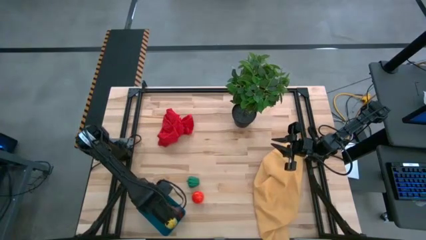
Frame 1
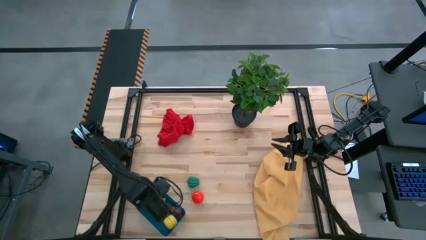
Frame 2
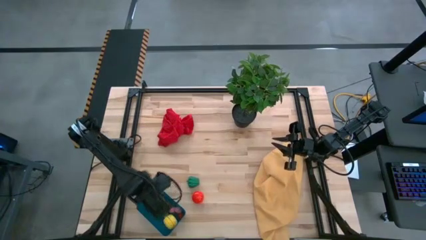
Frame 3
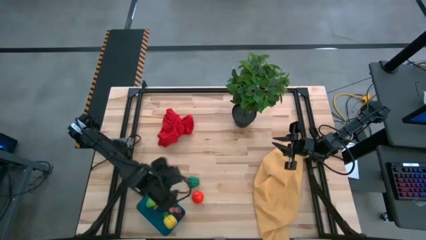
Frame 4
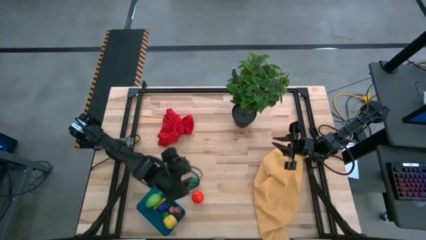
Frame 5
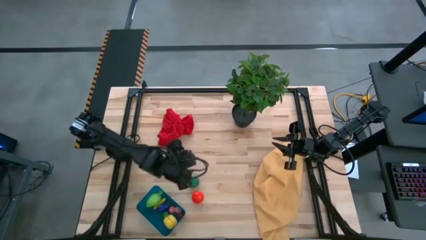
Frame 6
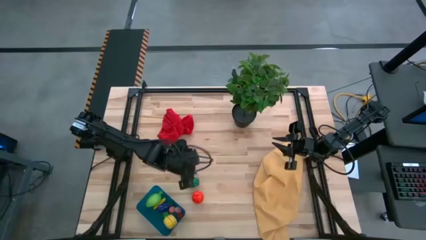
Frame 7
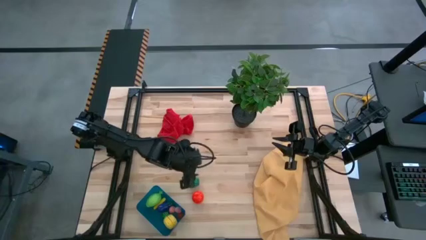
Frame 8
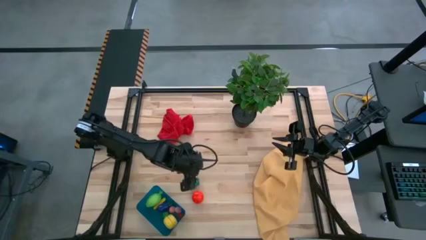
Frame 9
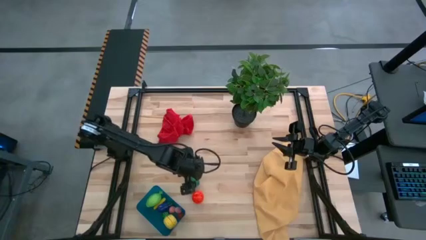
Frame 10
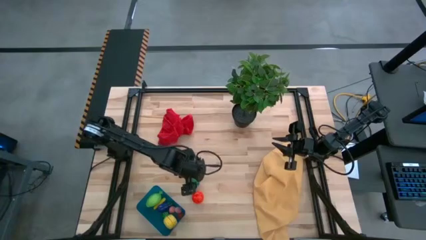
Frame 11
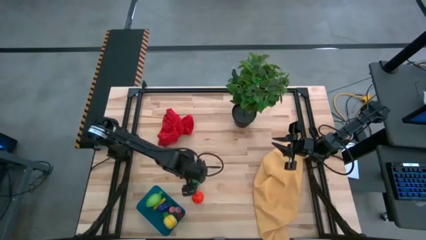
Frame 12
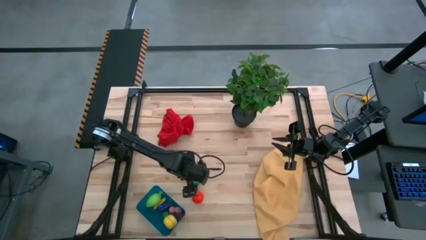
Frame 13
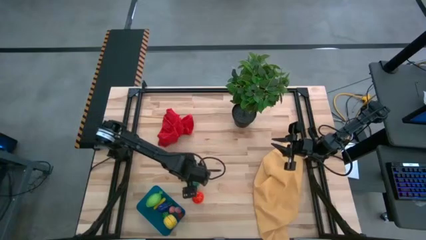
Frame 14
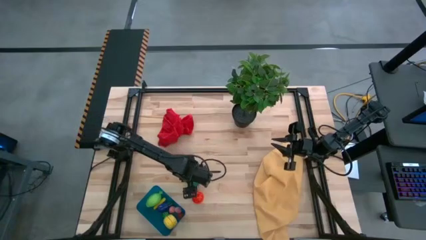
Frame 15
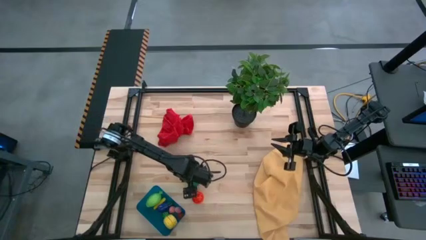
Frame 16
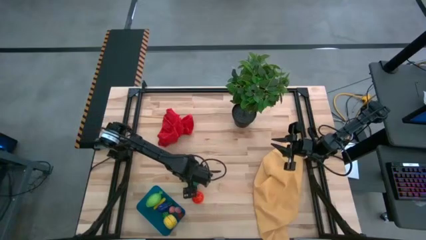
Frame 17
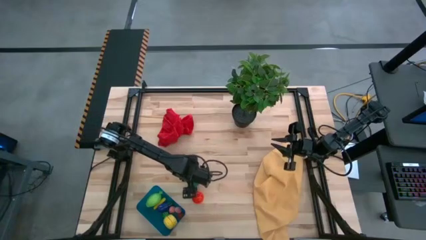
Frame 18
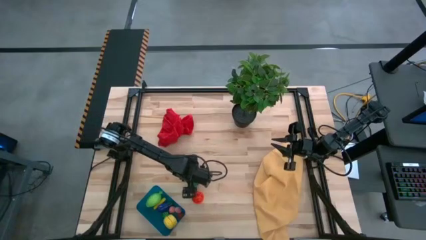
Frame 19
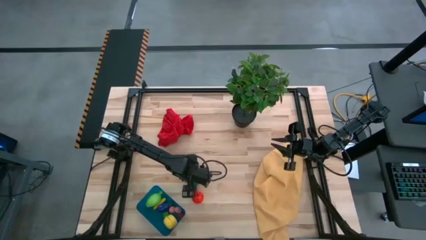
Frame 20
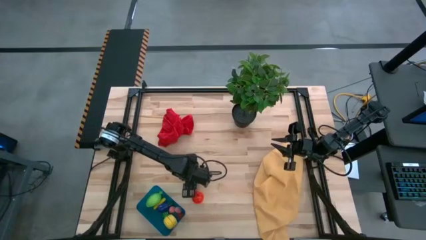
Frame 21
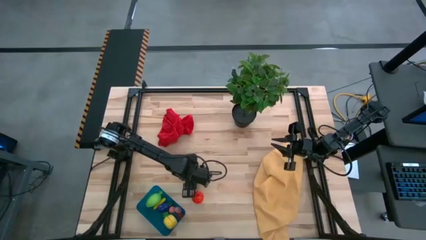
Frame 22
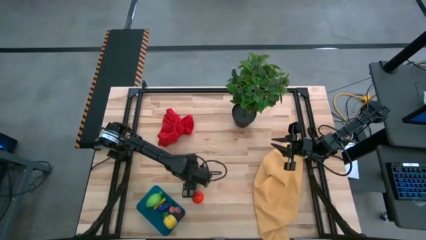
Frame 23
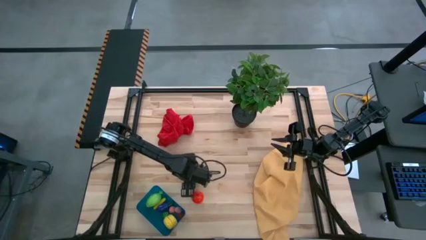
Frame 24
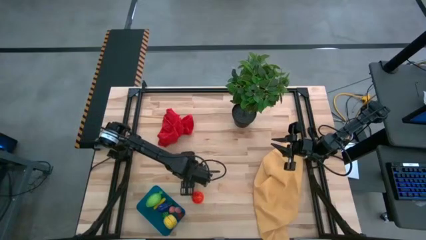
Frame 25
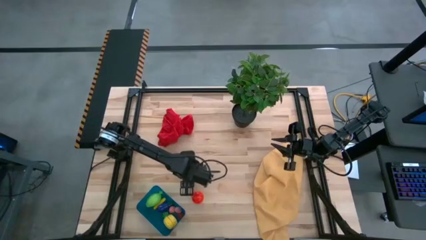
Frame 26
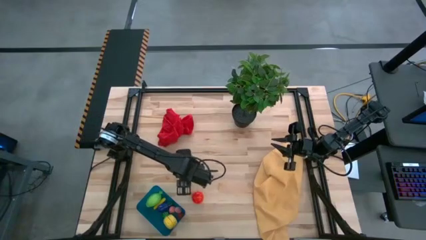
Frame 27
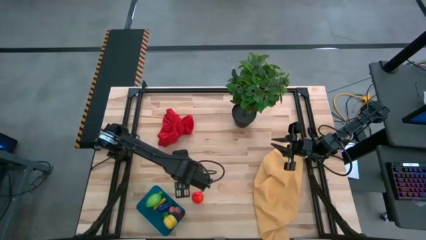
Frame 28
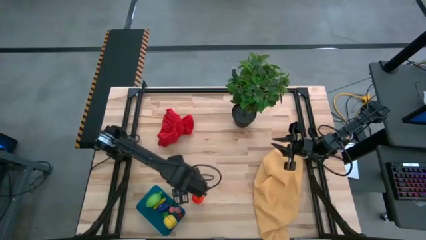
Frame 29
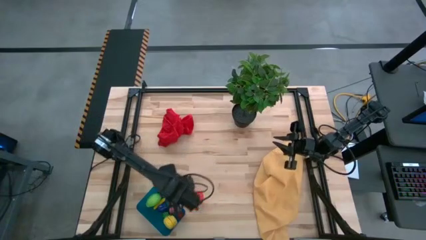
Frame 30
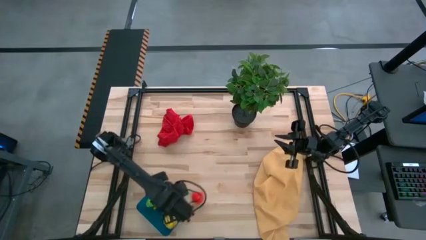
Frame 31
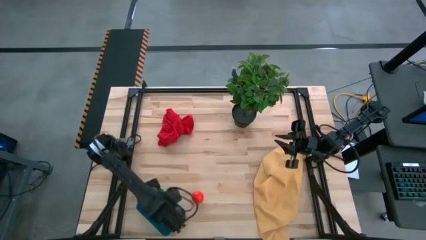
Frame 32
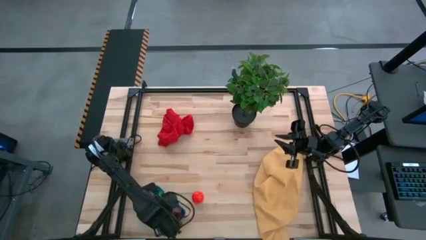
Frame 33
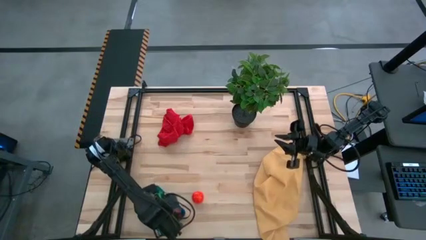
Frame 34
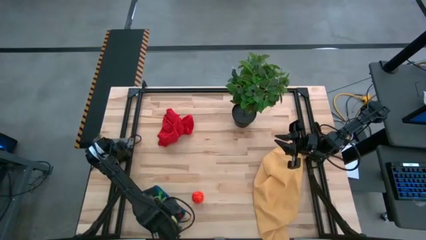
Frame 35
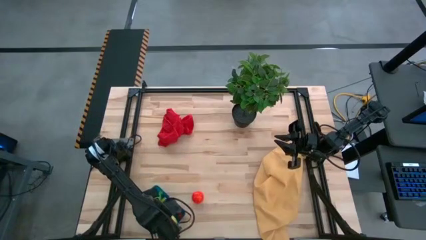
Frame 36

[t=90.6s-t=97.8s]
Task: Pick and placing Produce into tupperware
Put the green pepper into the blue bin

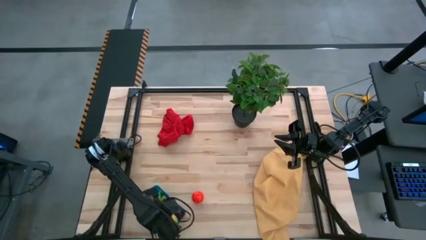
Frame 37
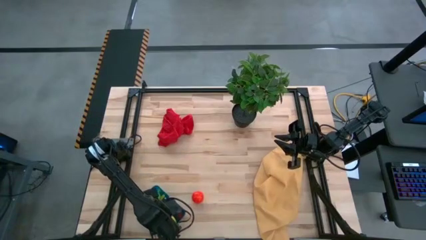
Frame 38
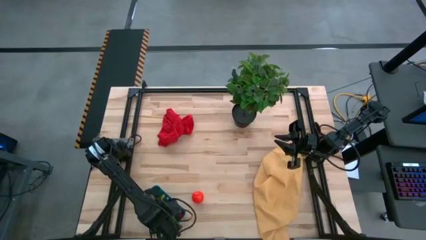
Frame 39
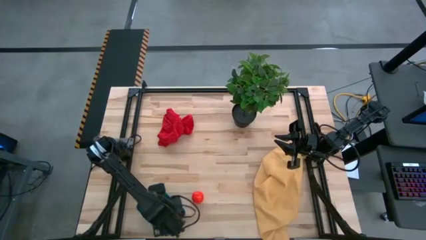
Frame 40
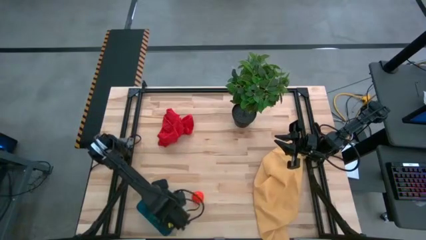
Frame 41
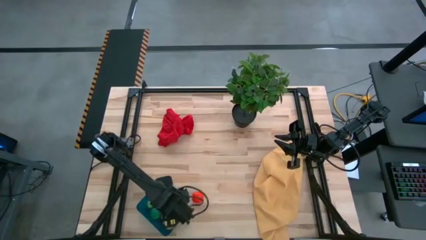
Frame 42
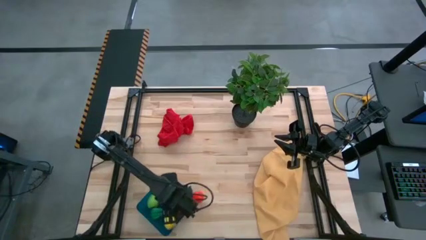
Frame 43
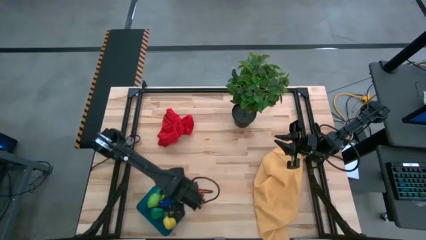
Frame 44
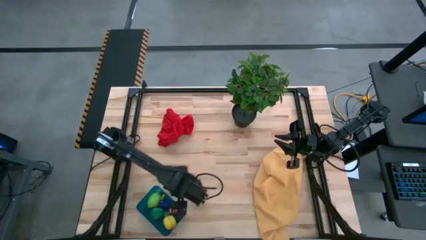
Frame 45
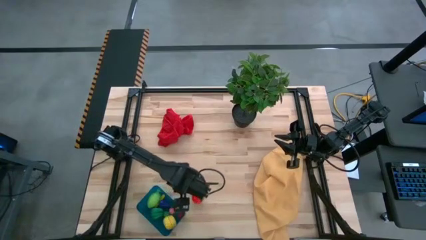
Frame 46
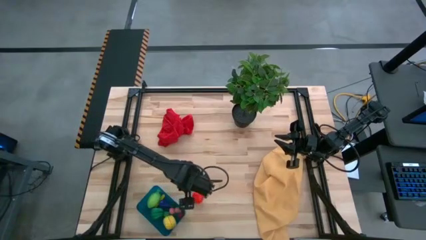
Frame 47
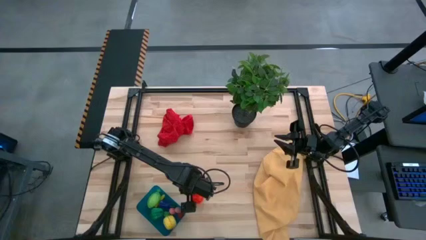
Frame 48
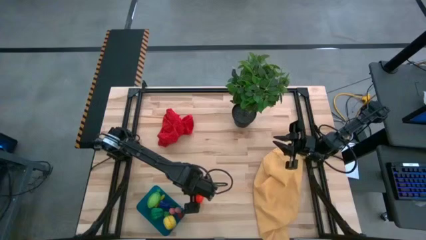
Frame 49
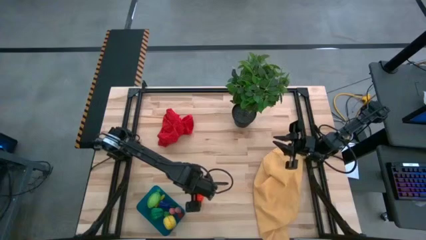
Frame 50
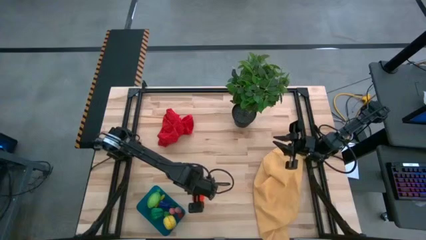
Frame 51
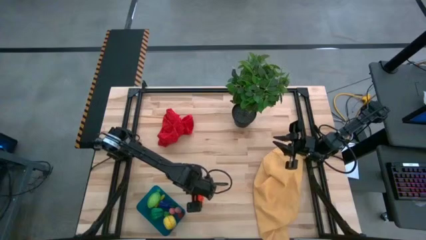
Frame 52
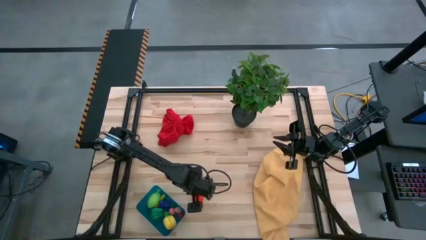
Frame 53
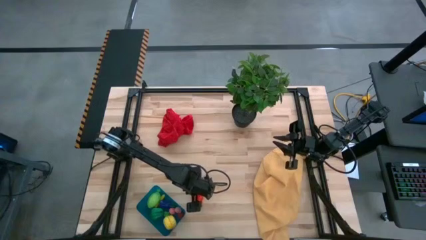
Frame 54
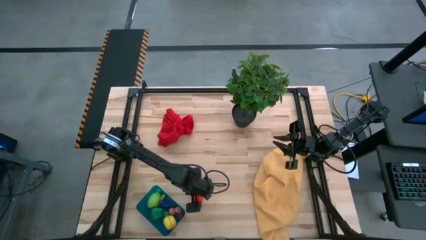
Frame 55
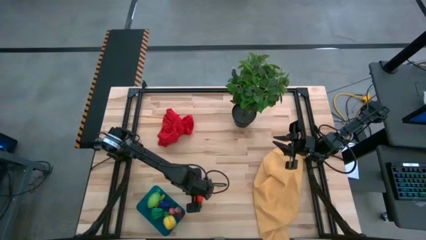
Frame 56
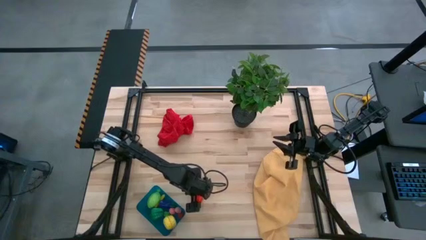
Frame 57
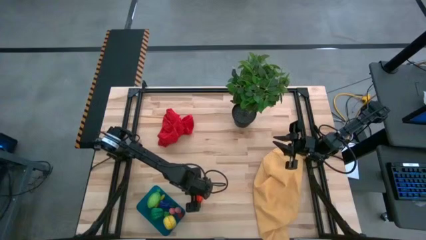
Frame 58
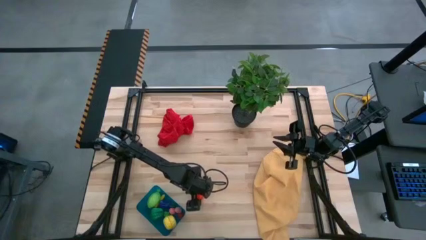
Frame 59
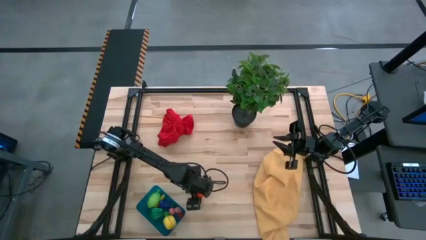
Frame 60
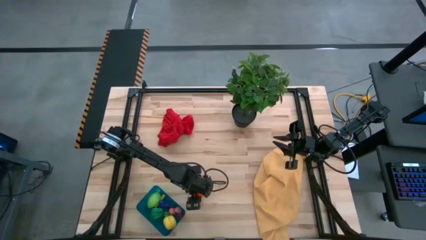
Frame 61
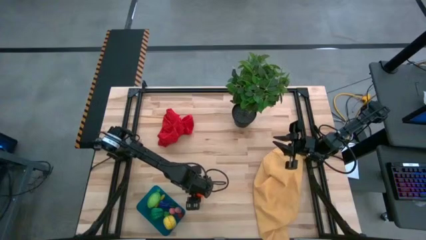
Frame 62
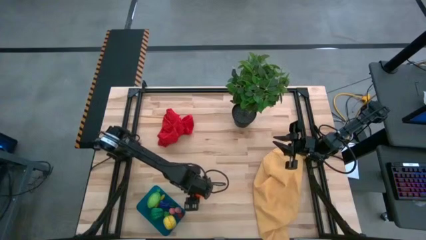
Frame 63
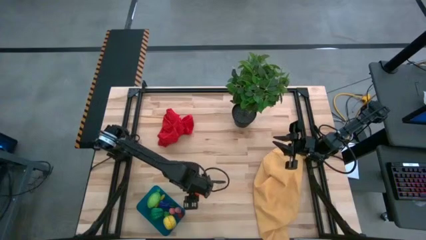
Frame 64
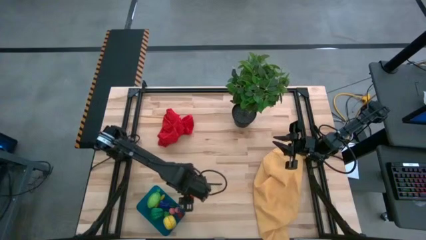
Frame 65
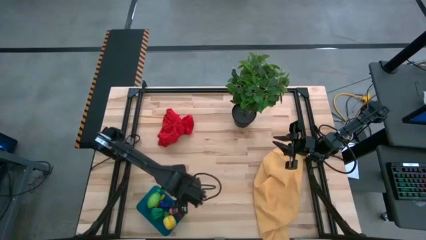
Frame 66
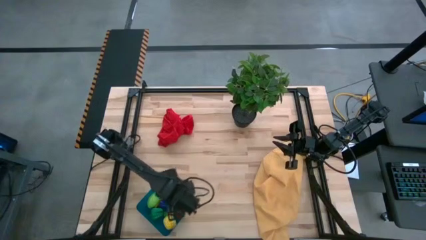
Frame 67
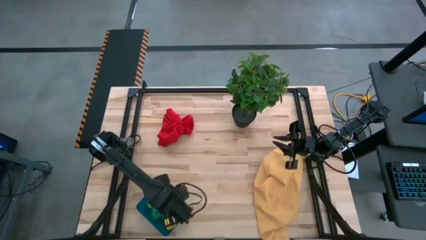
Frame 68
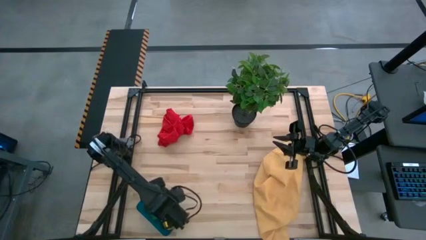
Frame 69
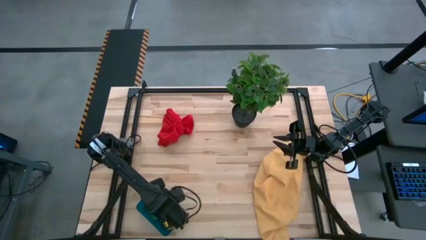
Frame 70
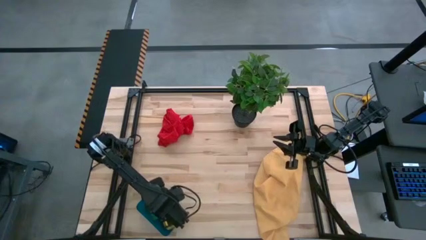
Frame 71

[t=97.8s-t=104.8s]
Put the red tomato into the blue bin

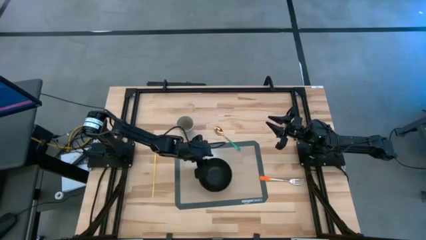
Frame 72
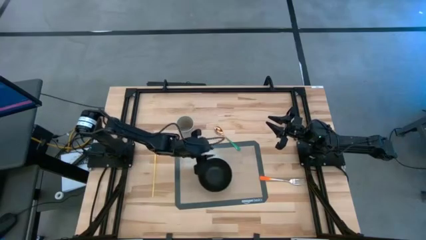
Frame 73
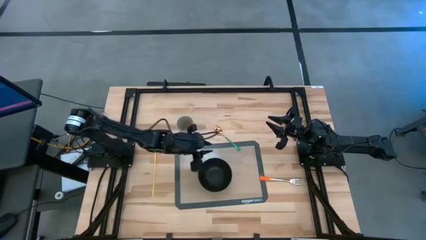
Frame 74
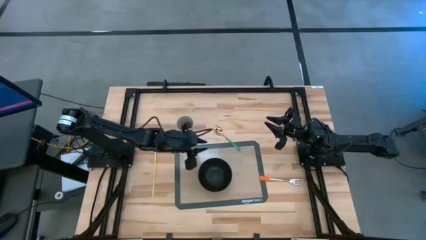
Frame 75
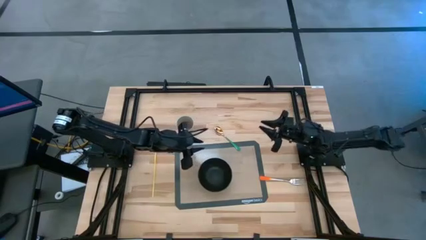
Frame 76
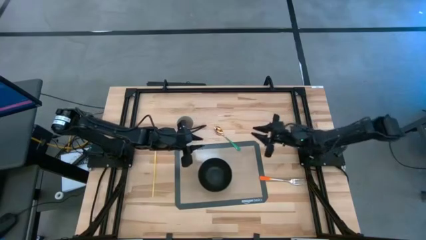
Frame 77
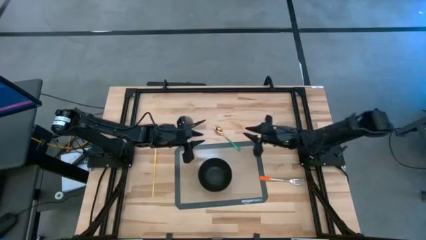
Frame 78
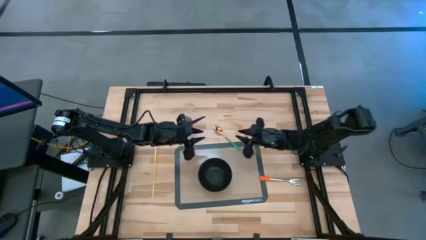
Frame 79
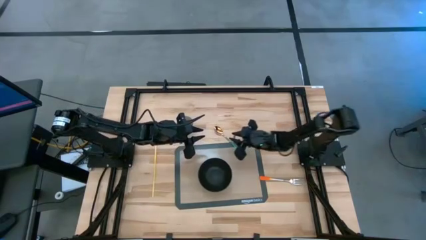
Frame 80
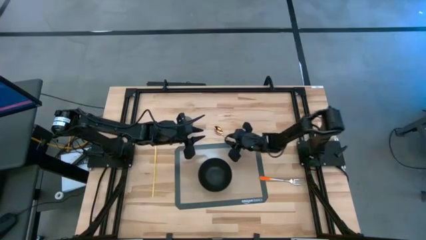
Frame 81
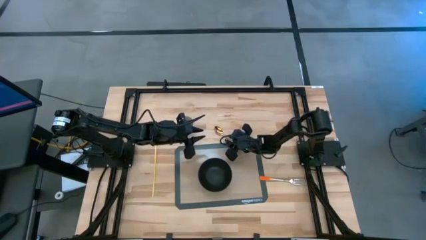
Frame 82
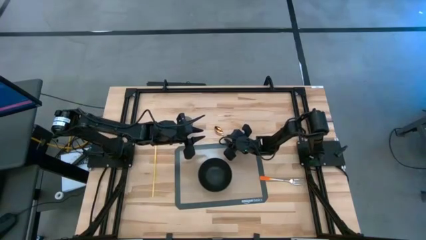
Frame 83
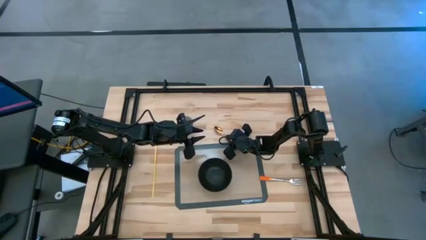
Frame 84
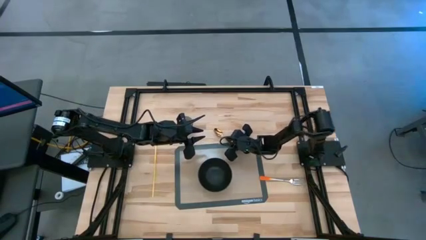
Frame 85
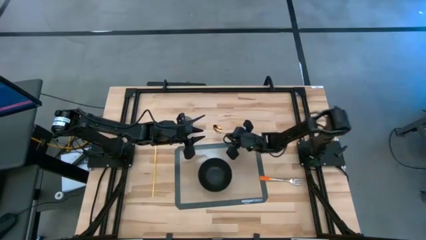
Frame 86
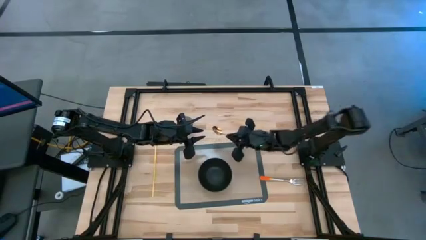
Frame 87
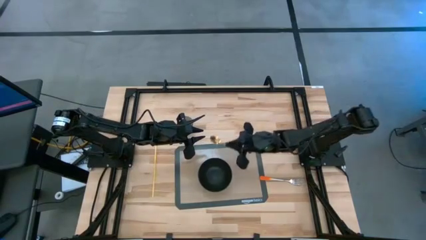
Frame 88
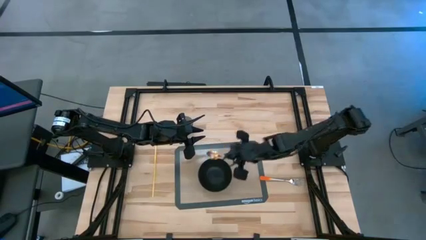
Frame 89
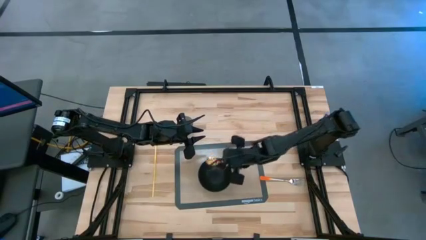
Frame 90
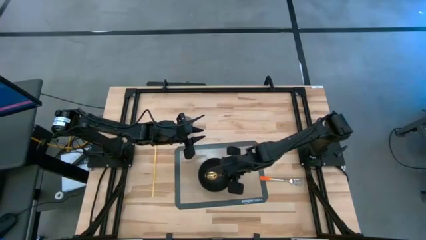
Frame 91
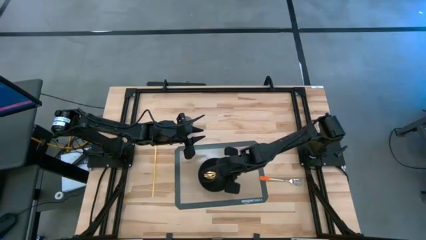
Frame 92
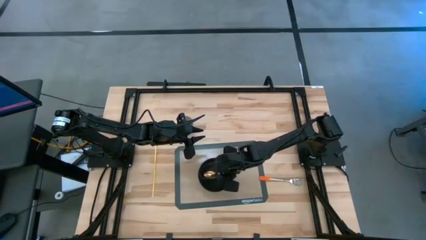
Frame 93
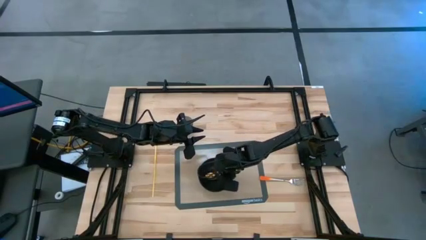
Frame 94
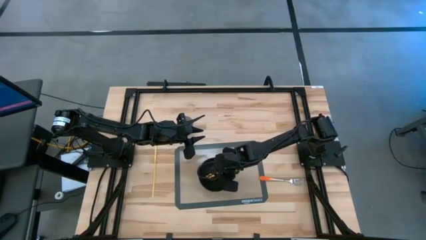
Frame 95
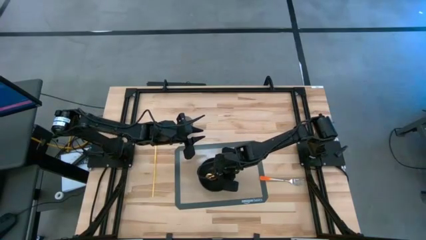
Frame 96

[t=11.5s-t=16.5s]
Task: Pick & Place Utensil
Put the green spoon into the black bowl on the transparent mat
